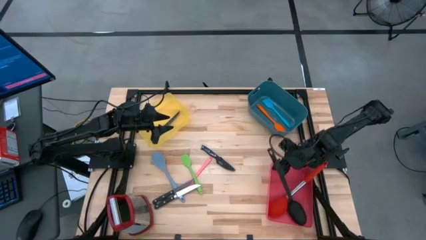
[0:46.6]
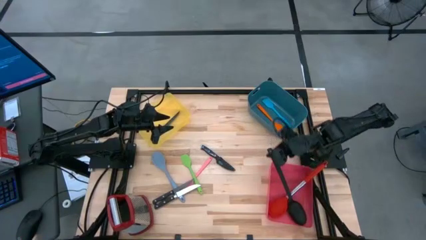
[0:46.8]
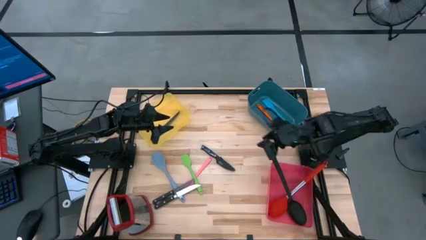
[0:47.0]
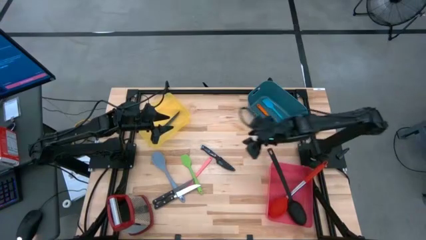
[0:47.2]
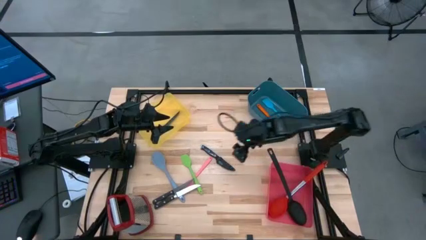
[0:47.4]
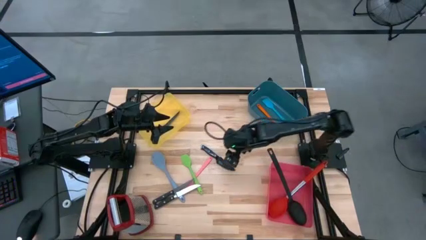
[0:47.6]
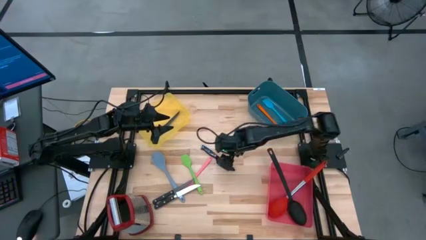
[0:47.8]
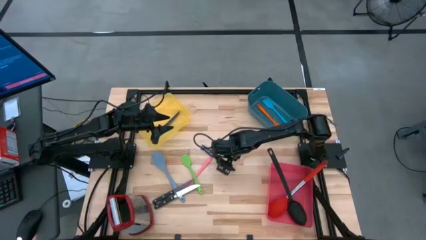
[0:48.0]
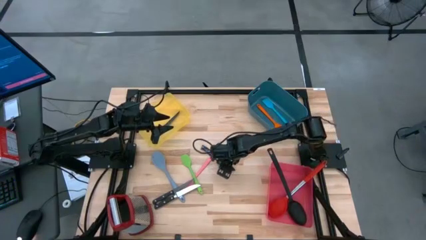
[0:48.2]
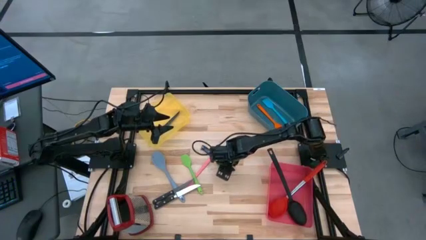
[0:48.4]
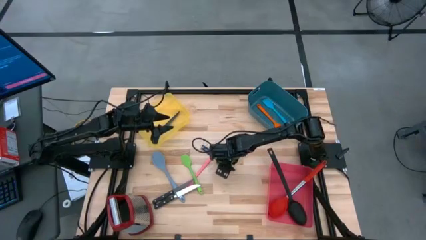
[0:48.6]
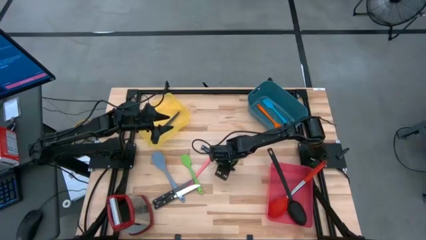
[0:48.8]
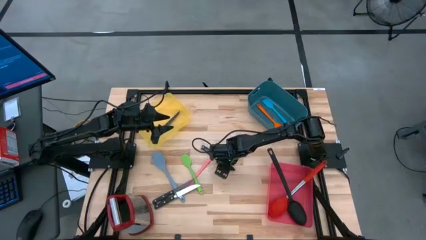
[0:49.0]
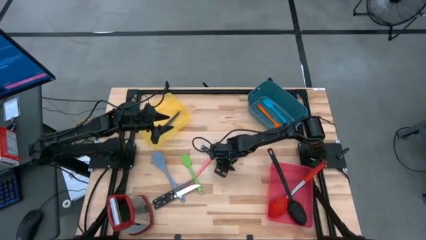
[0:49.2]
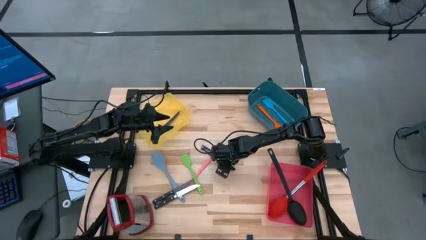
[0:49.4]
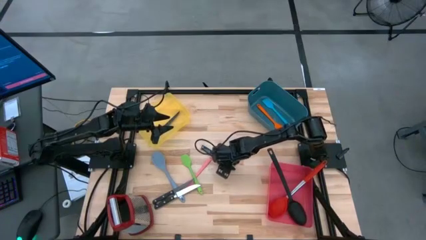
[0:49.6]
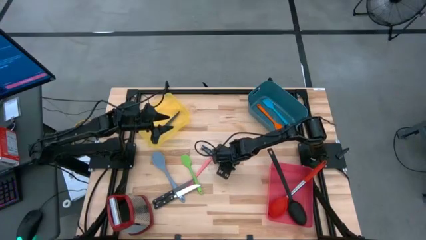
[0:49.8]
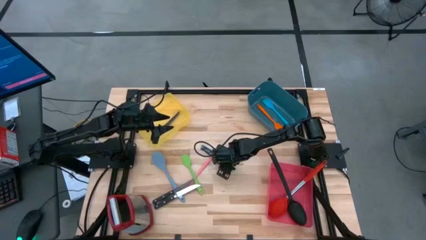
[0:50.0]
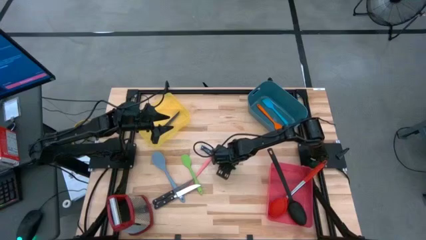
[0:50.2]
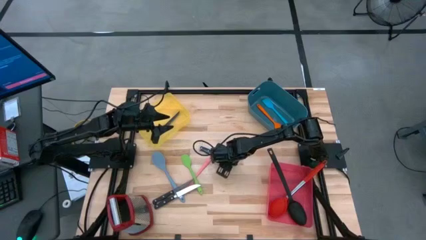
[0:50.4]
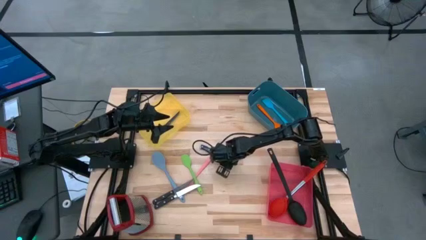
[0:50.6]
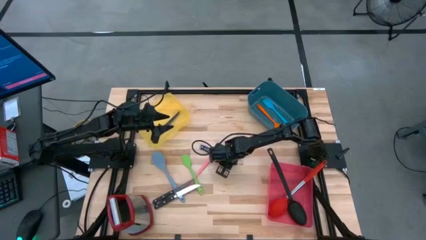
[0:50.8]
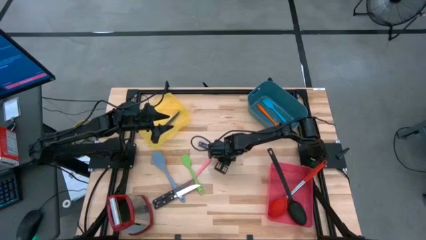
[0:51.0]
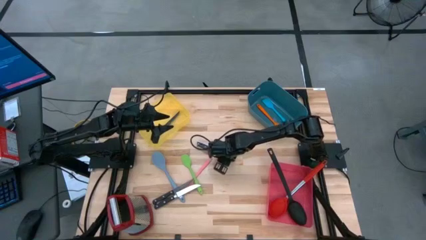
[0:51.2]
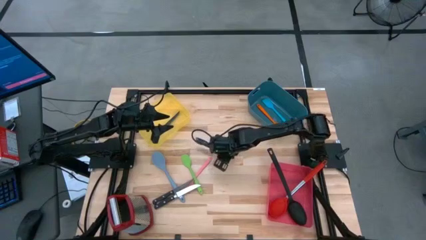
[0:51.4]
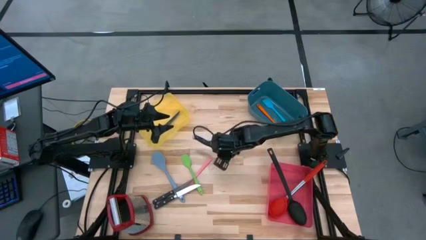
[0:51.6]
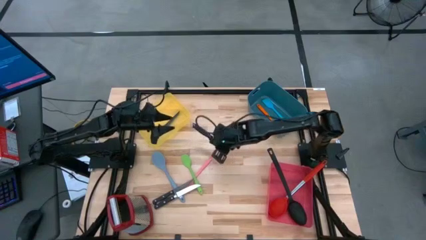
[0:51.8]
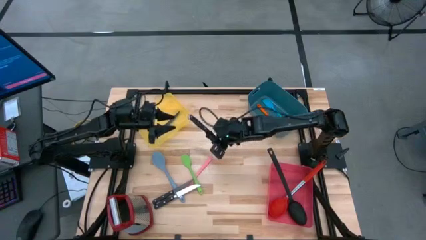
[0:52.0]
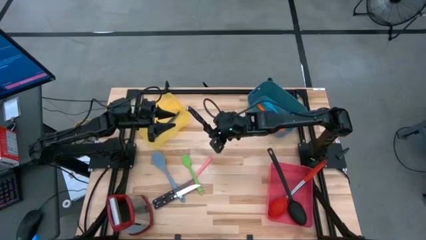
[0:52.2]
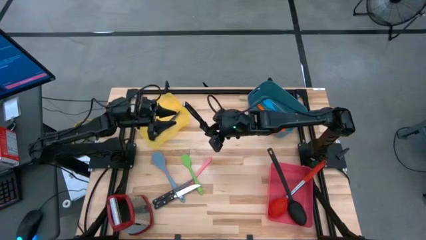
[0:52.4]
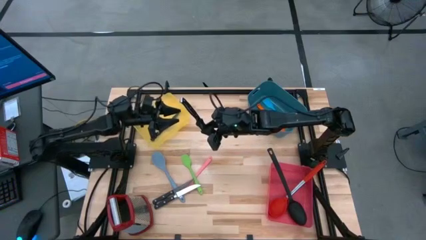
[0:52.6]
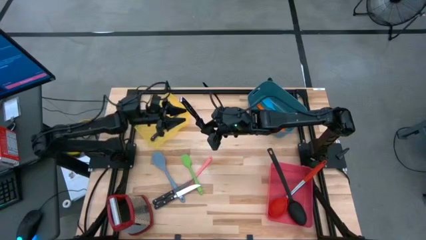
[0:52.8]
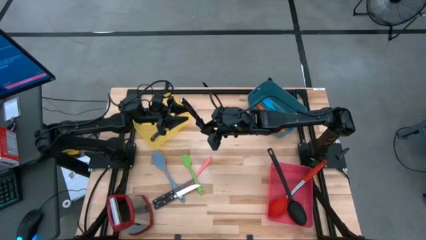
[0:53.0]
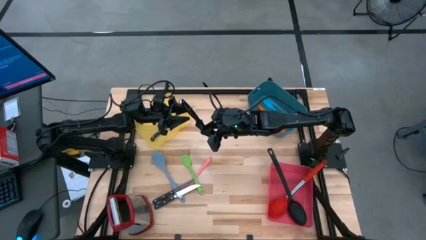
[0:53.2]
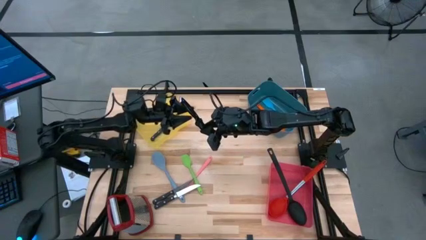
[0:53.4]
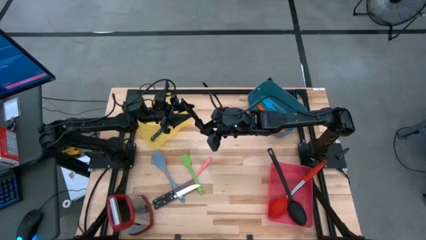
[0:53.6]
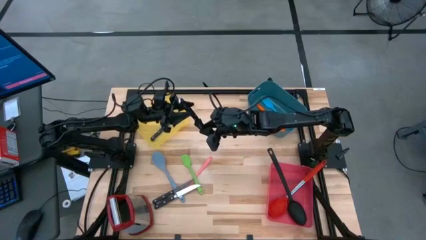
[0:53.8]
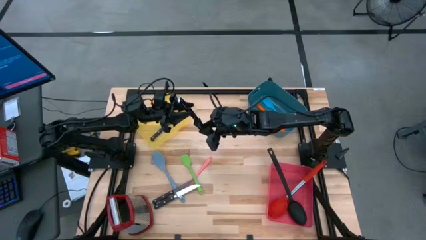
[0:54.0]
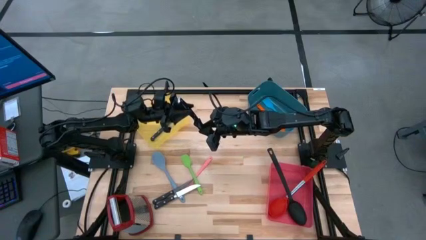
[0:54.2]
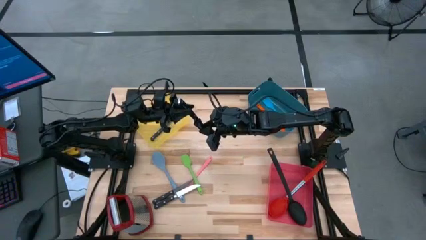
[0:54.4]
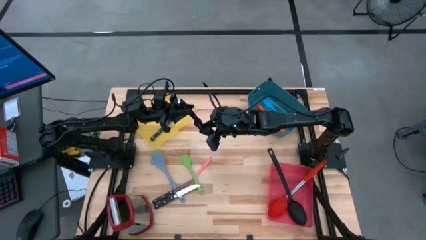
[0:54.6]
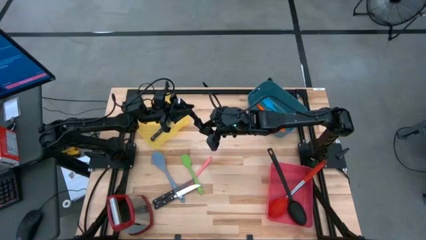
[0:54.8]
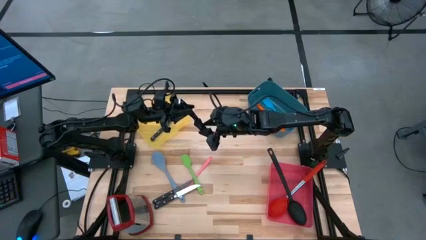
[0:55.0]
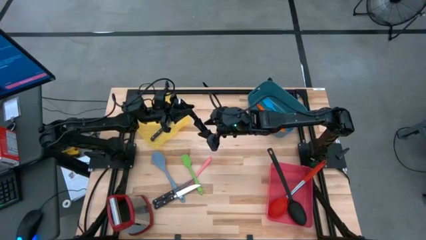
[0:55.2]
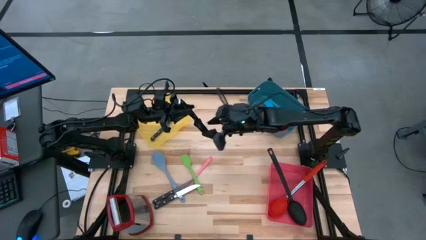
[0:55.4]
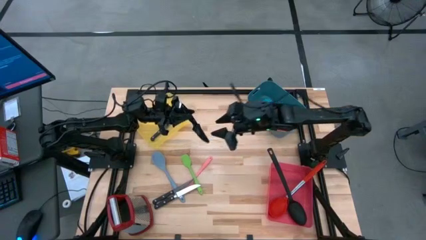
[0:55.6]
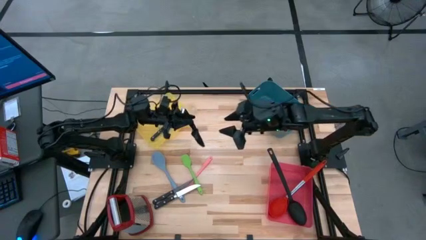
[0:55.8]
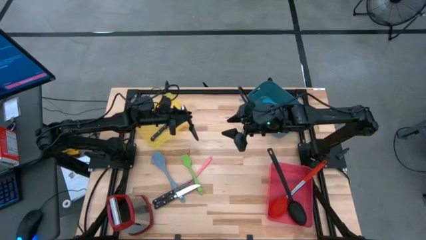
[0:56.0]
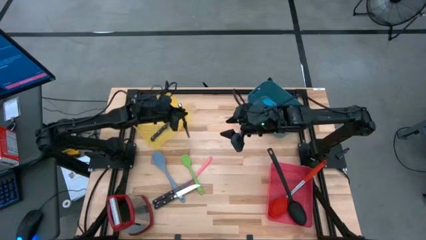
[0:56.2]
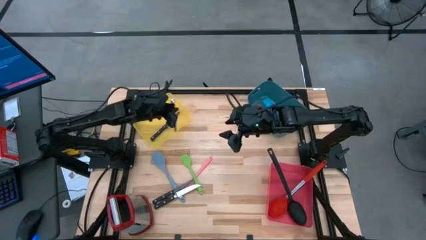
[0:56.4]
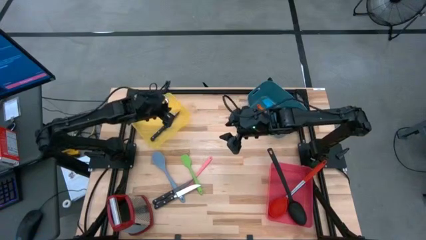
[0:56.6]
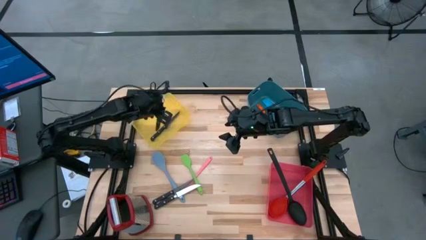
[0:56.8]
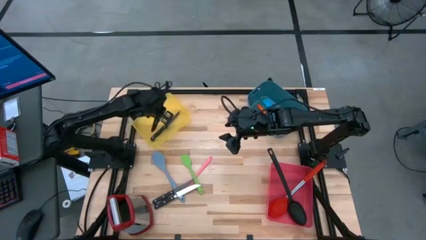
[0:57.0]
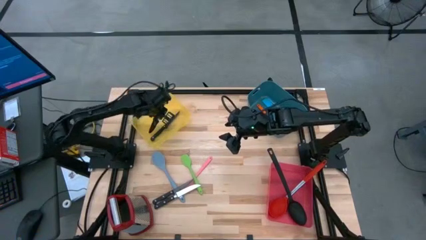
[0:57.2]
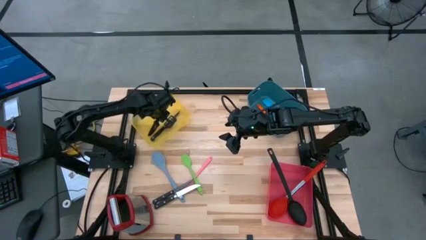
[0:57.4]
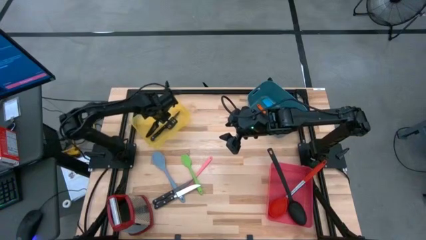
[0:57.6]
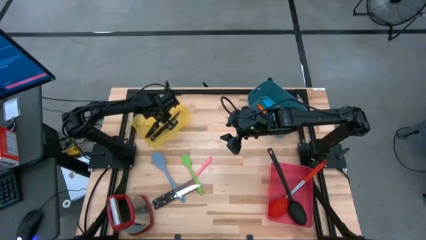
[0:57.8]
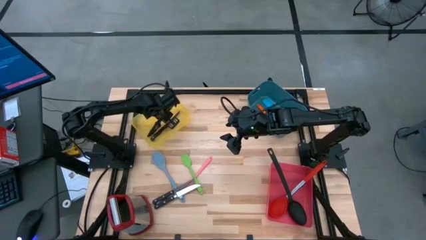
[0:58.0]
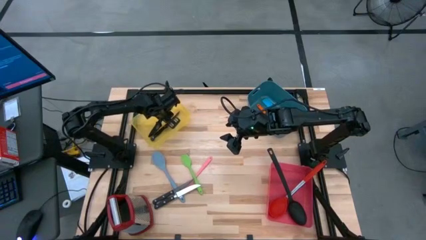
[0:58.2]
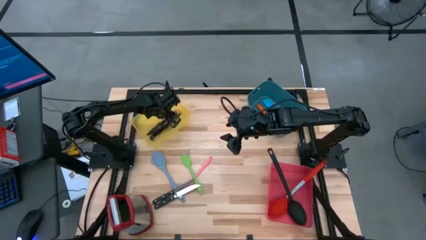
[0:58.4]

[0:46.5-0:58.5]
Task: Pick & Place Kitchen Items
Put the black knife into the yellow bin

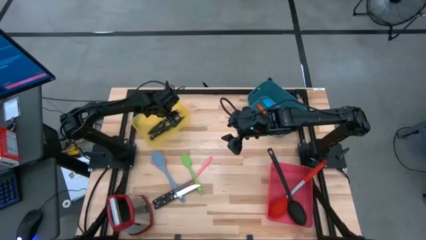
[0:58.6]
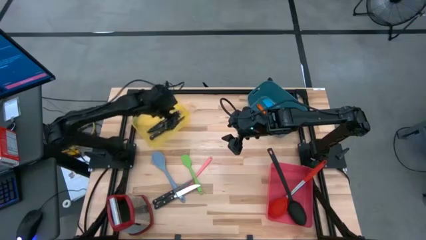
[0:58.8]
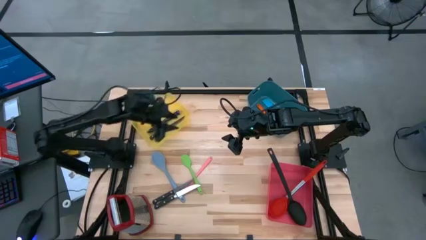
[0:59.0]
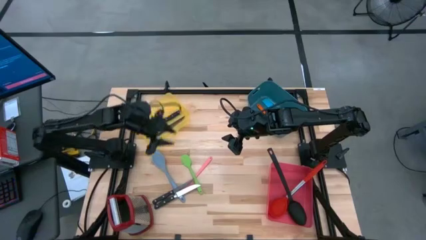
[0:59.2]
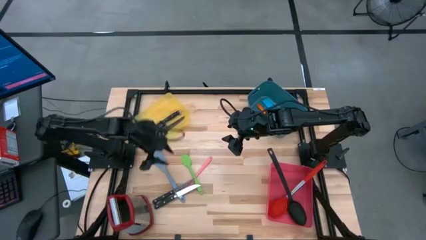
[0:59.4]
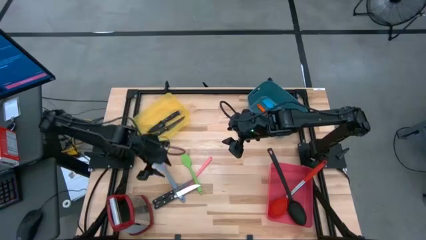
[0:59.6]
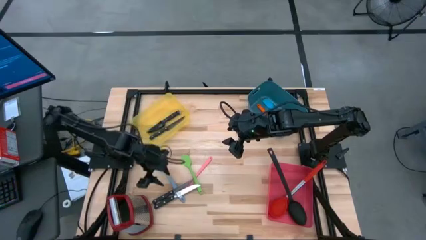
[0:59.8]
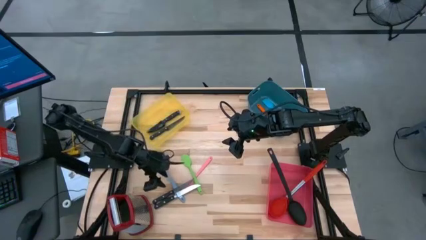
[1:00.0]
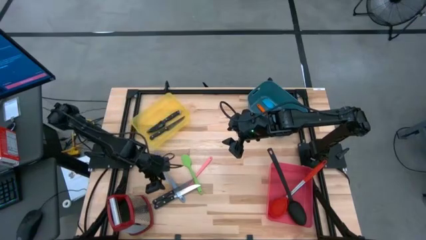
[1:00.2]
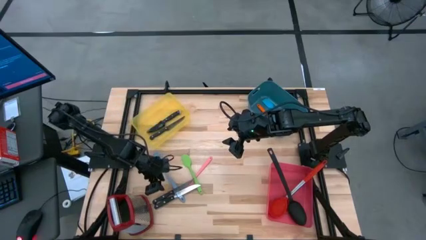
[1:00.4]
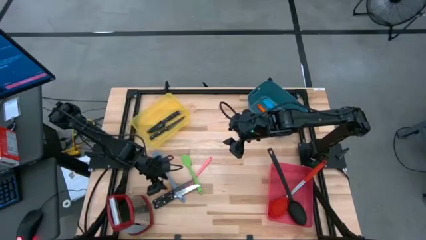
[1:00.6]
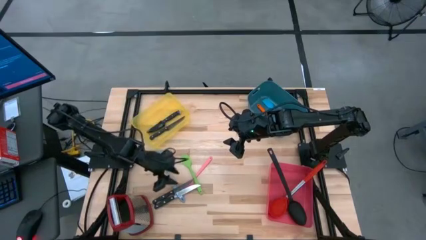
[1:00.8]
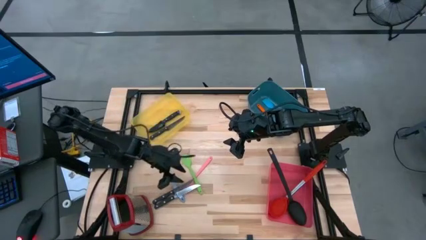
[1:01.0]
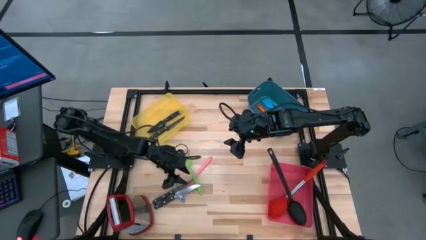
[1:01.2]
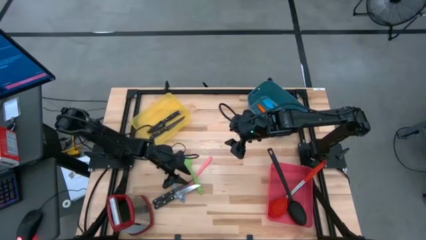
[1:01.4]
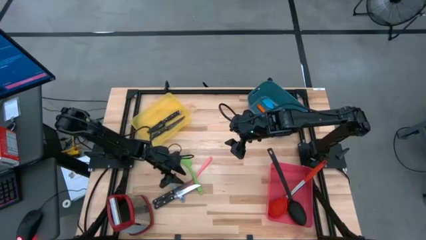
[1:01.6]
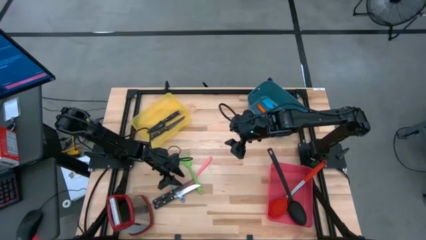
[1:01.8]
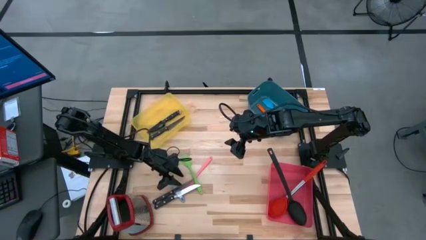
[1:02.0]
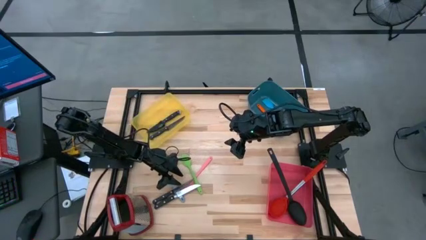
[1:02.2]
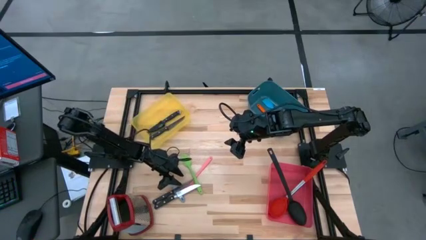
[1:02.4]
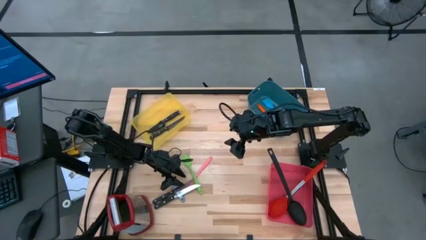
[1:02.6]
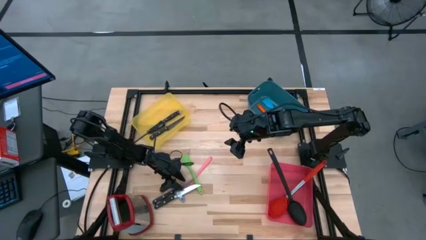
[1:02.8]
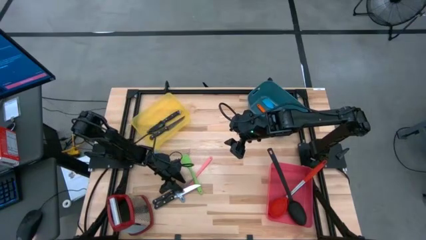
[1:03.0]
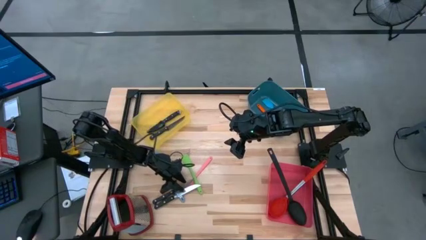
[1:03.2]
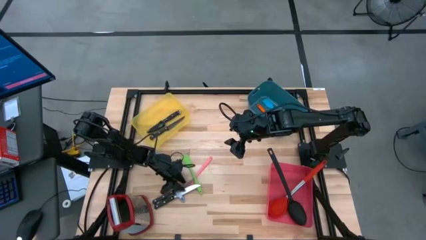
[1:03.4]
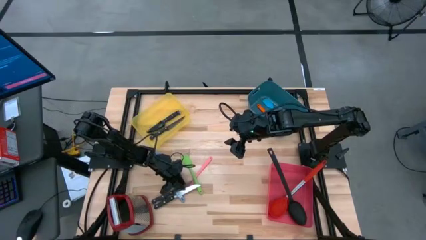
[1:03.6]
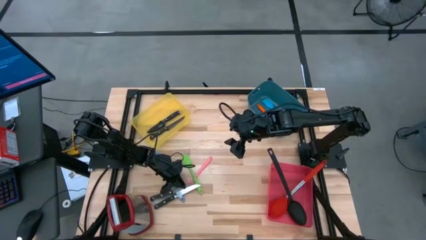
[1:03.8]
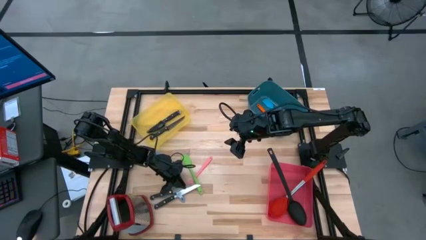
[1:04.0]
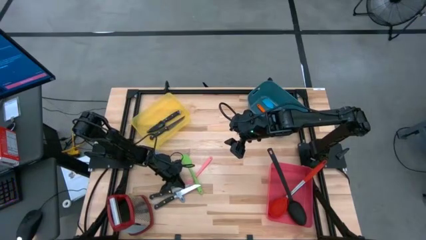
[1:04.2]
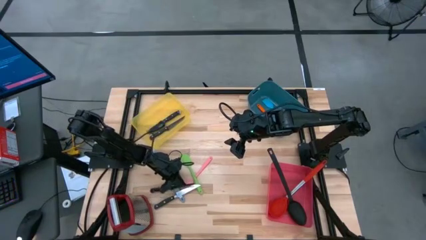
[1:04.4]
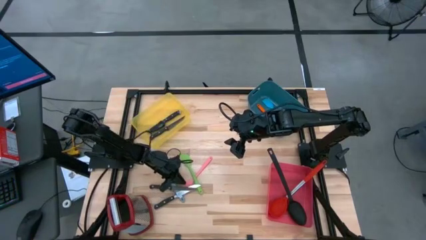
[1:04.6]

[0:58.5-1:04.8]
Put the left silver knife into the yellow bin
